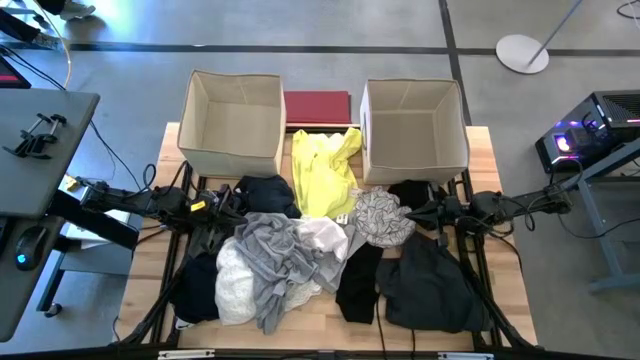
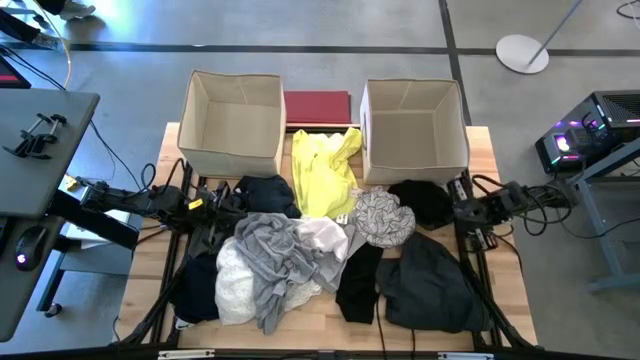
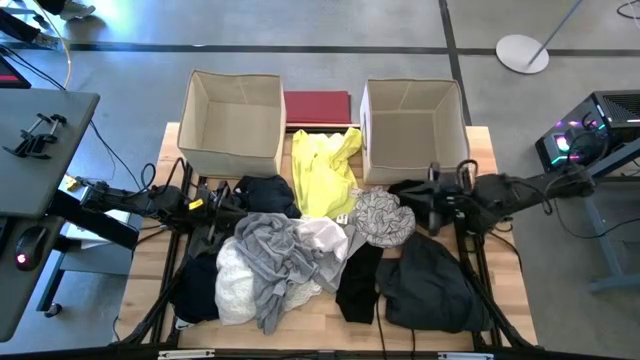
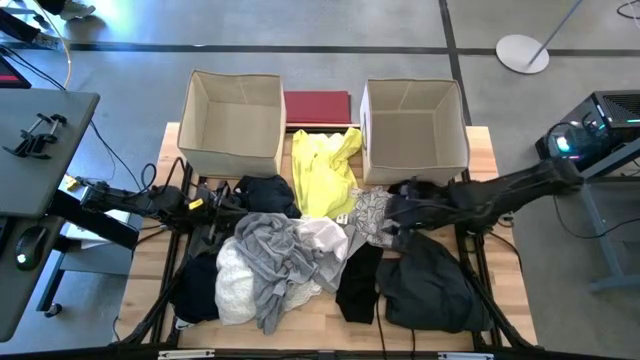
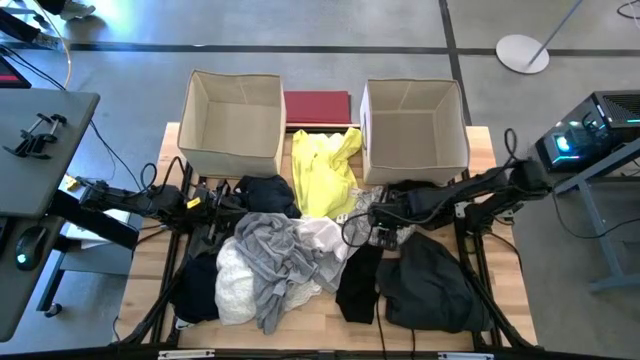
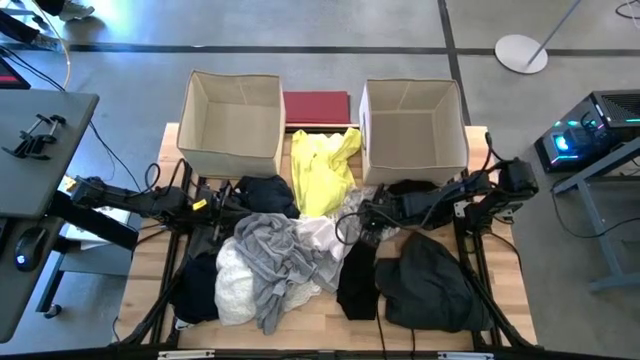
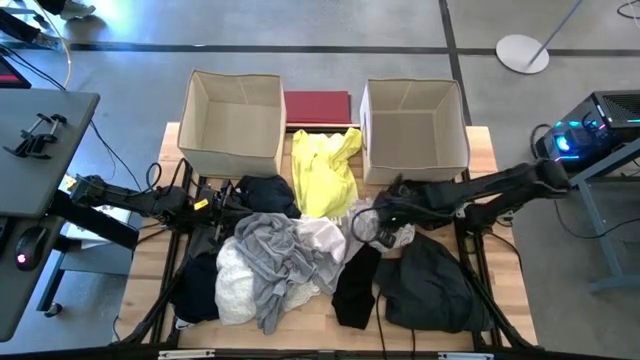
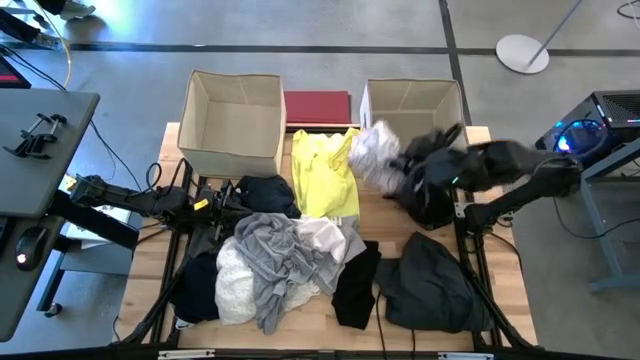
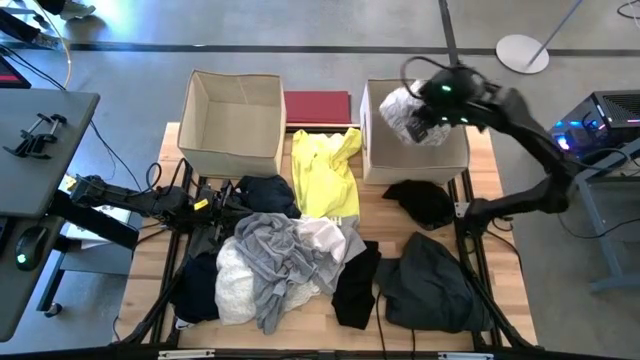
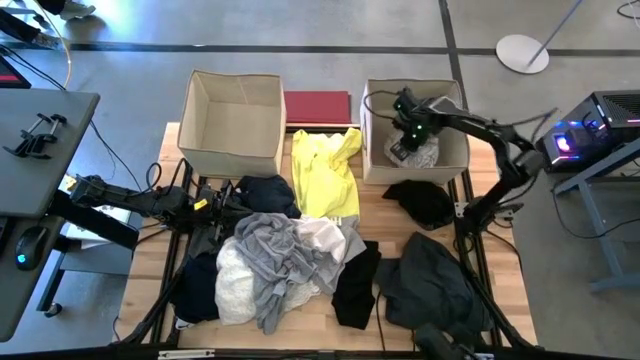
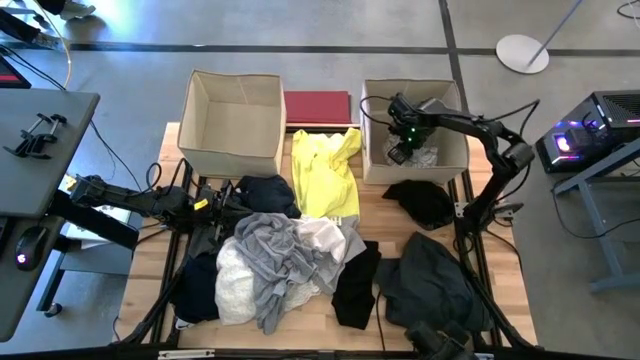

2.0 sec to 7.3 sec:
Task: Sort clothes
Put the leaf-patterned cloth into the right laundry organizer

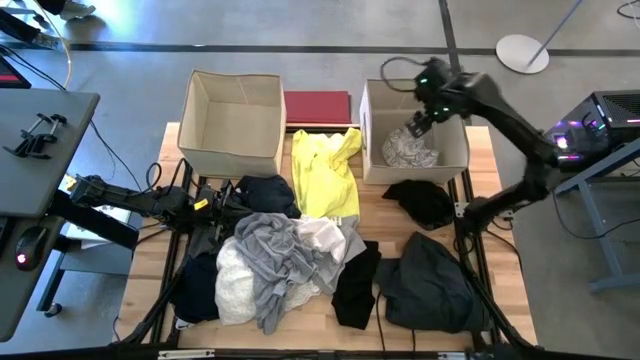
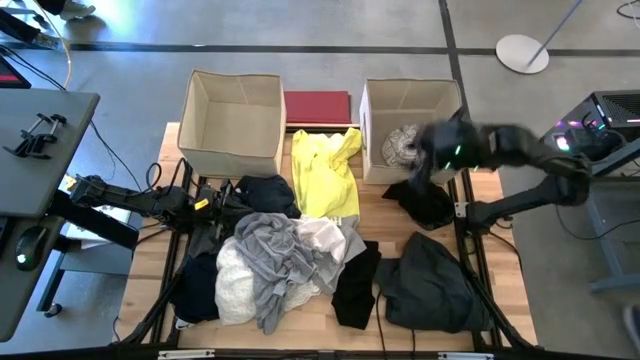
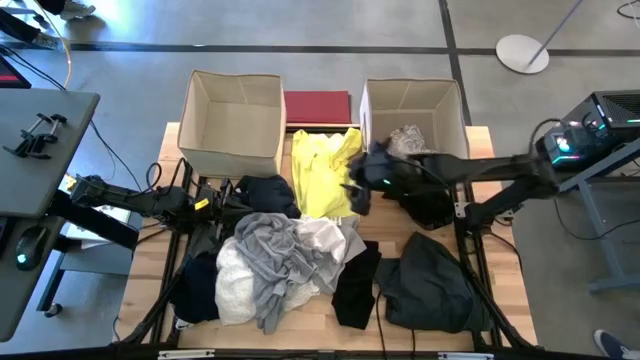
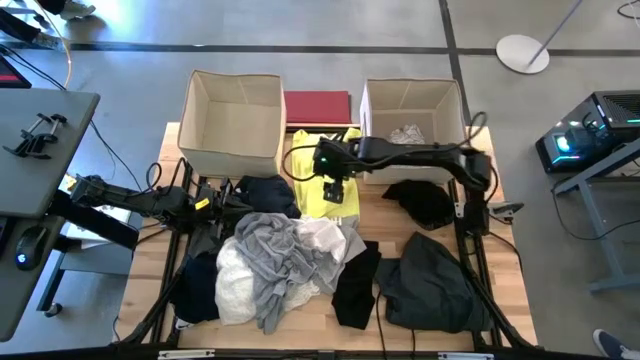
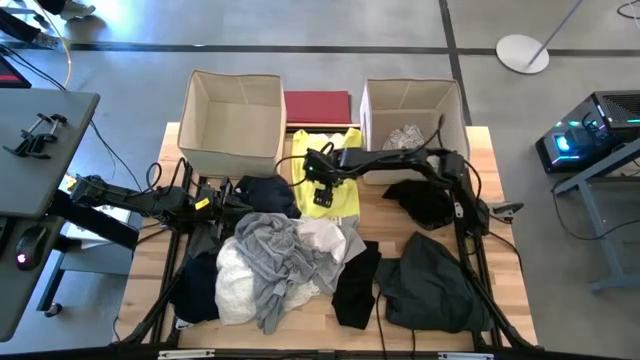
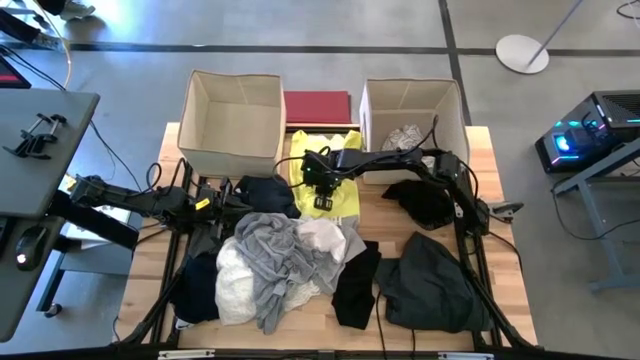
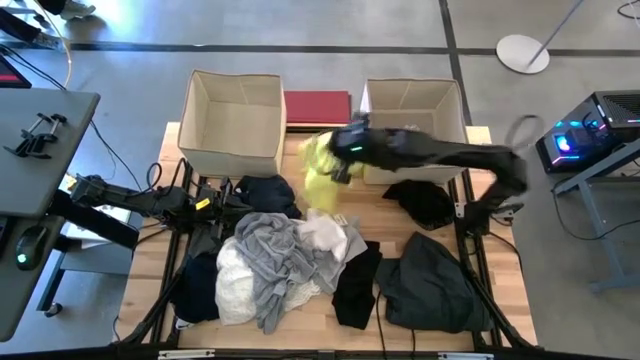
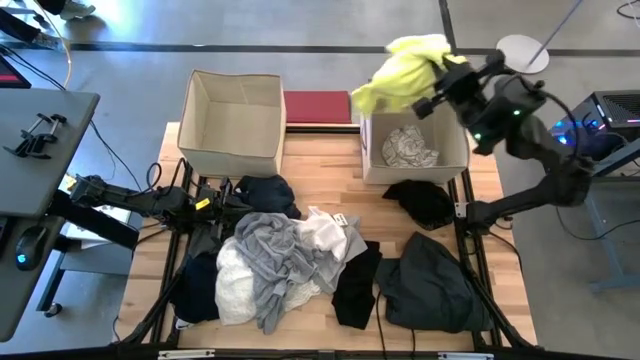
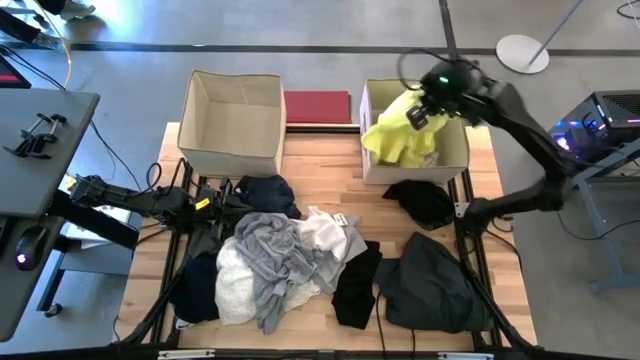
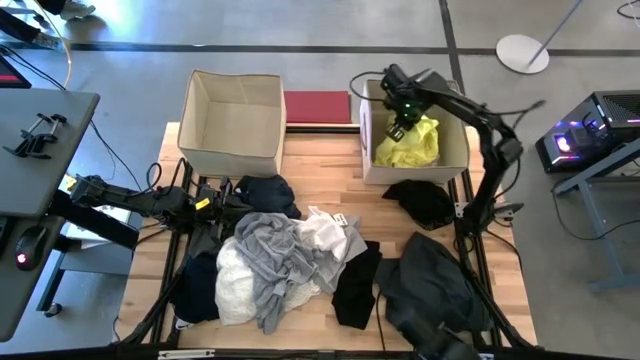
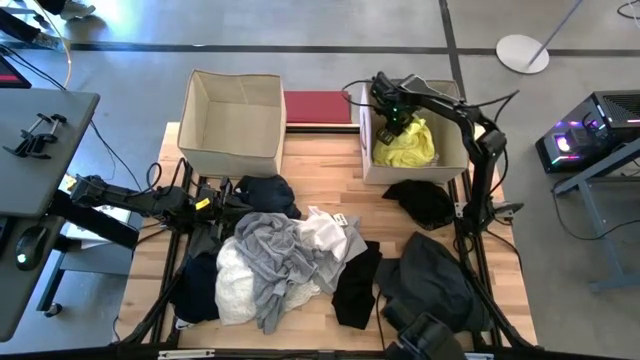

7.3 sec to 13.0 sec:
Put the yellow cloth into the right laundry organizer

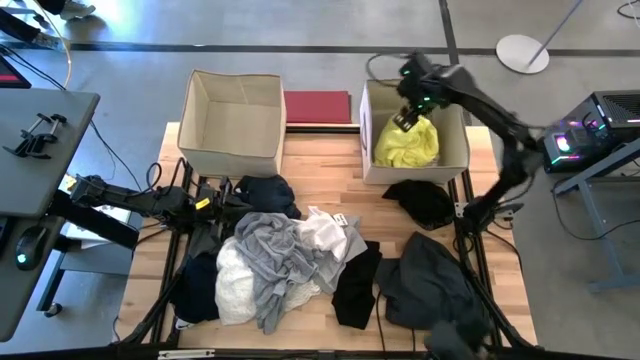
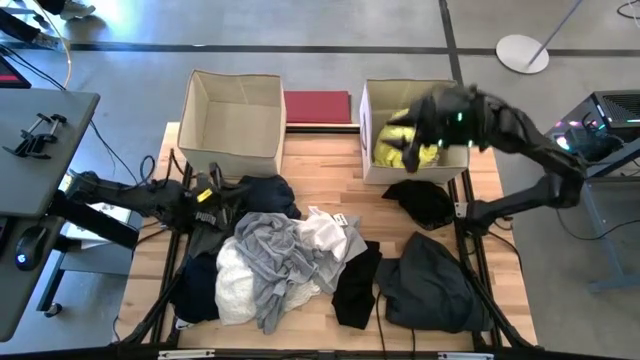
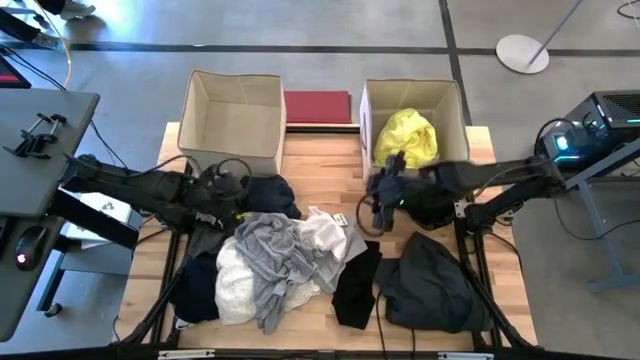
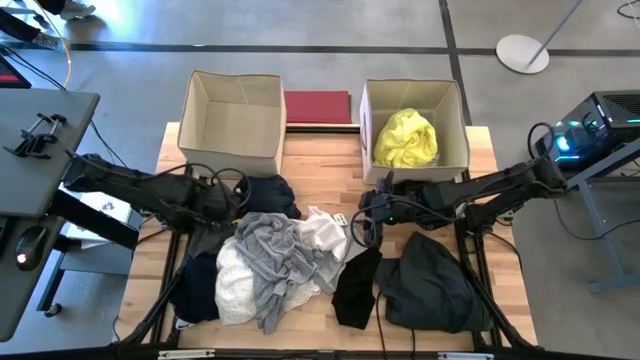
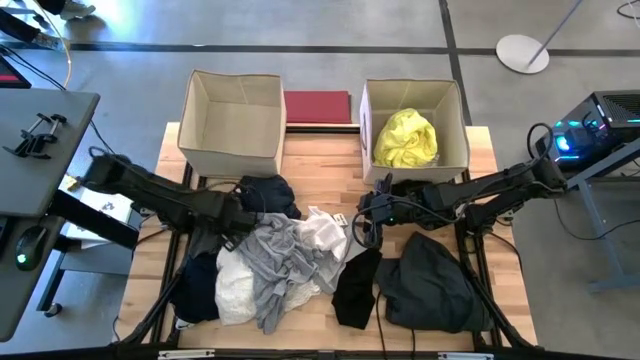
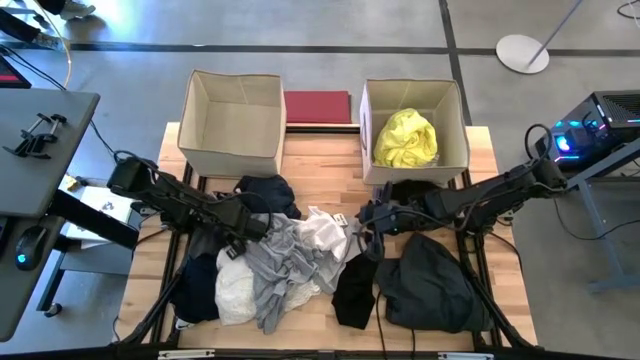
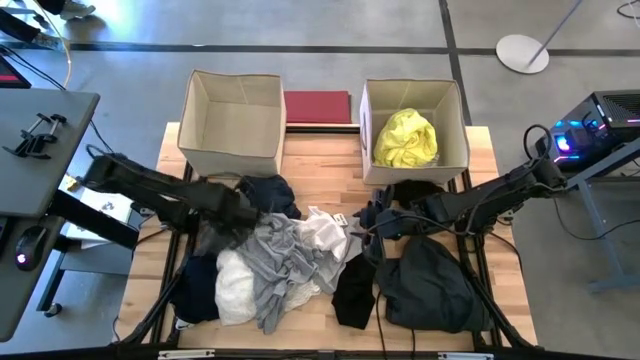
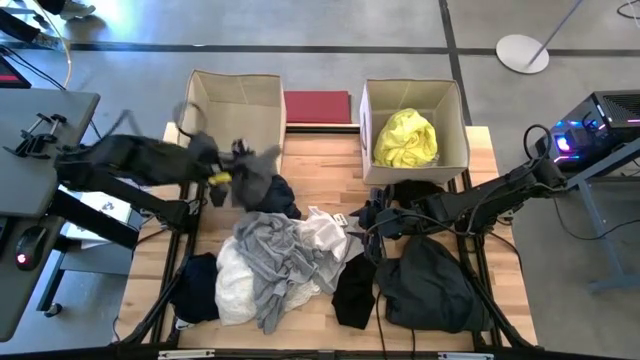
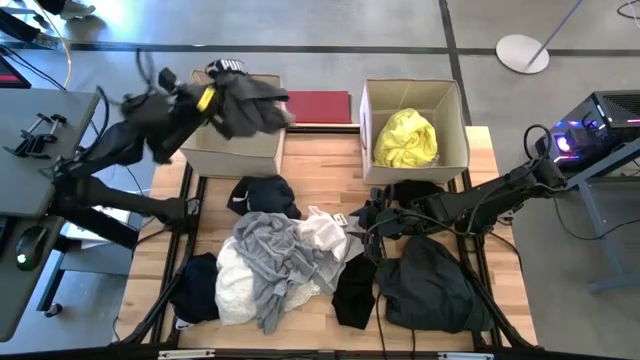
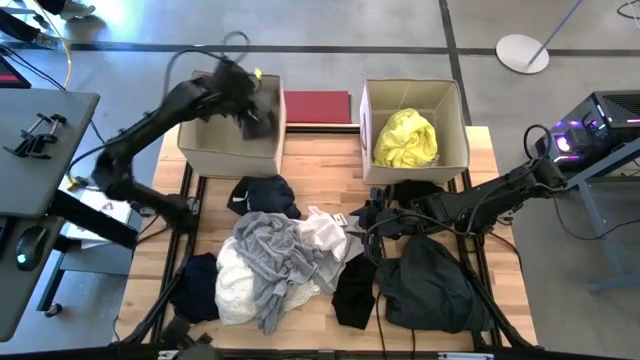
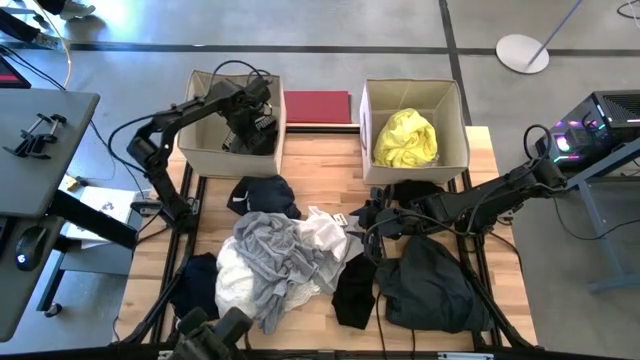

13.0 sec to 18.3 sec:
Put the gray boxer into the left laundry organizer

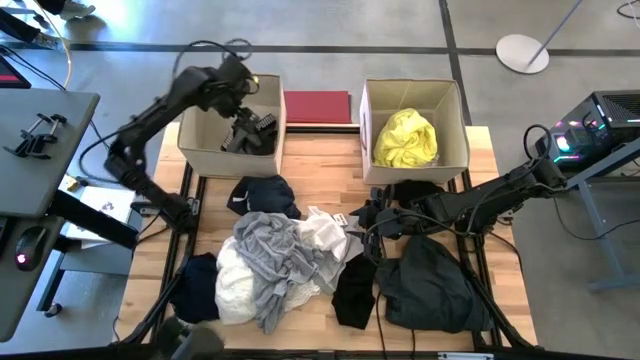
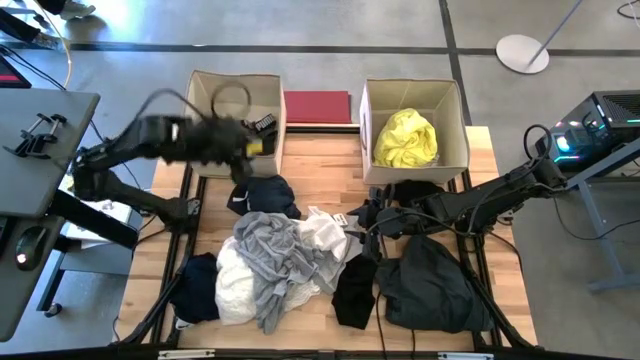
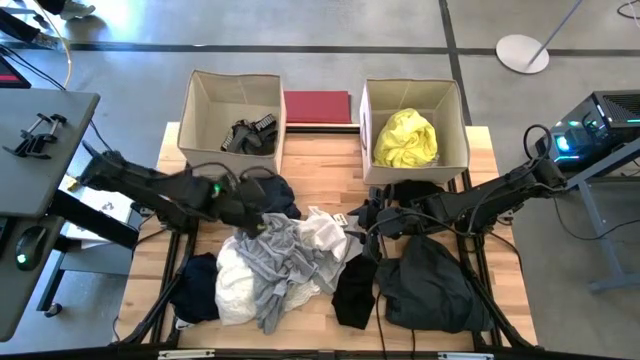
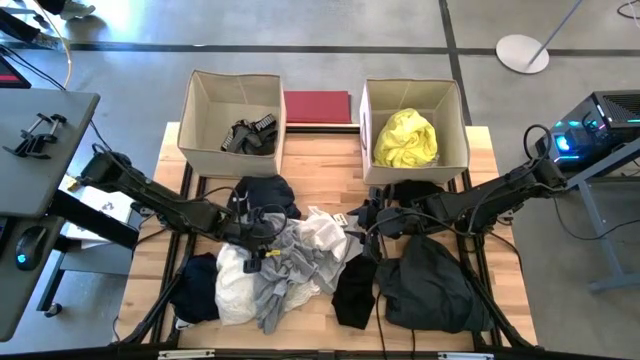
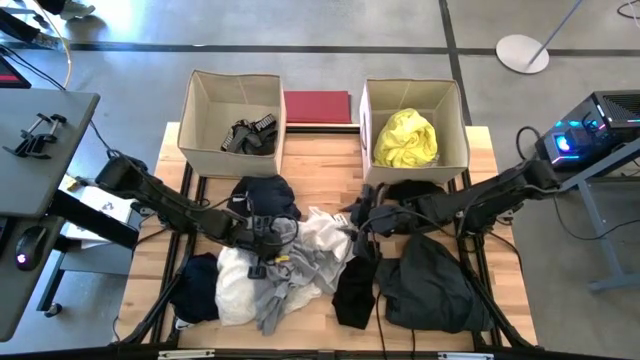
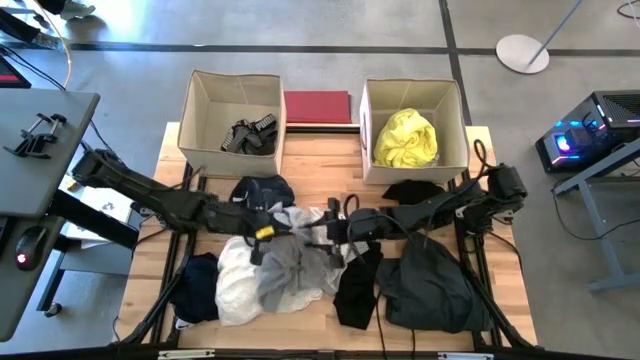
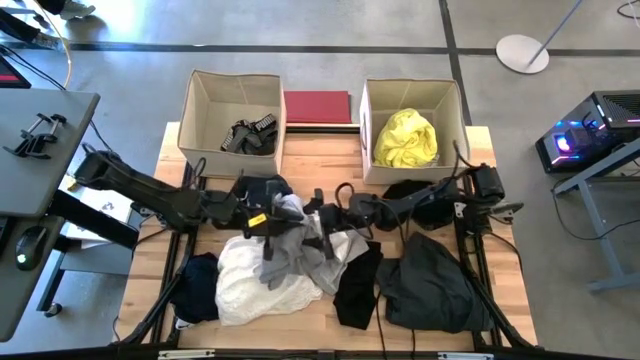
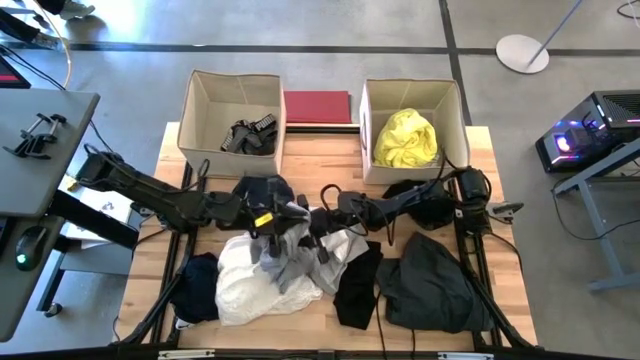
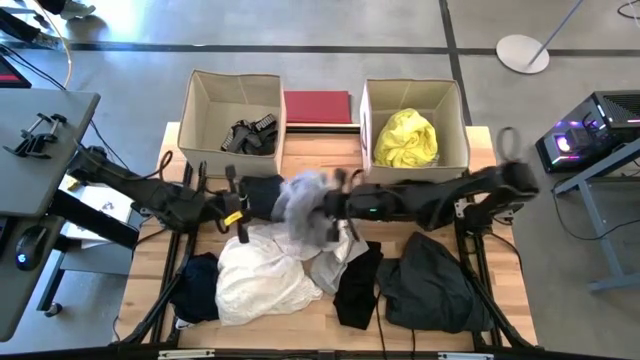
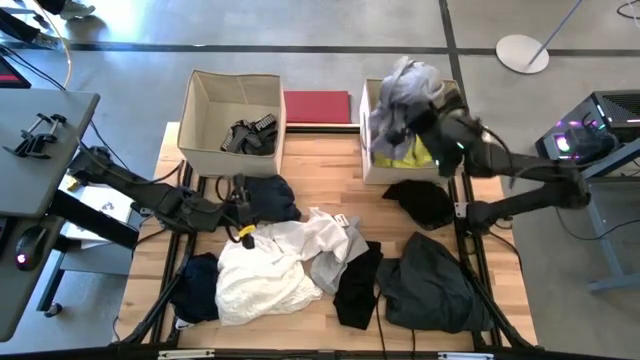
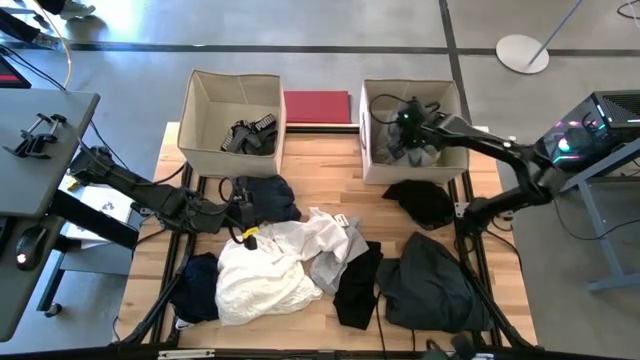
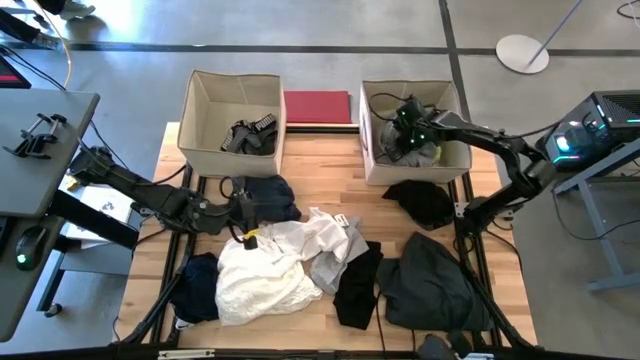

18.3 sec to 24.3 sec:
Put the gray cloth into the right laundry organizer
